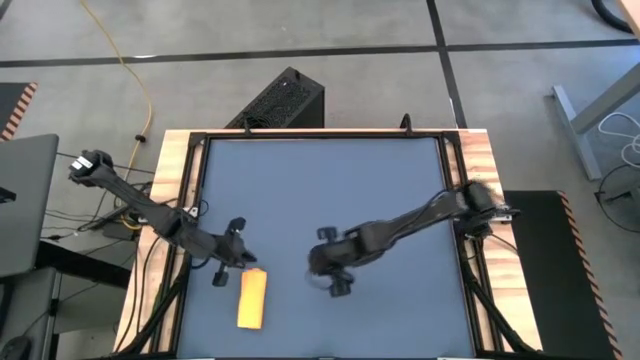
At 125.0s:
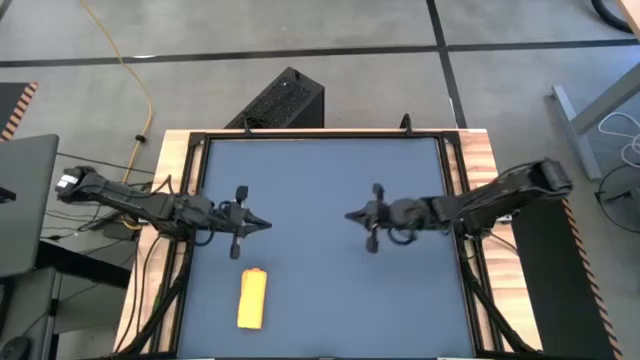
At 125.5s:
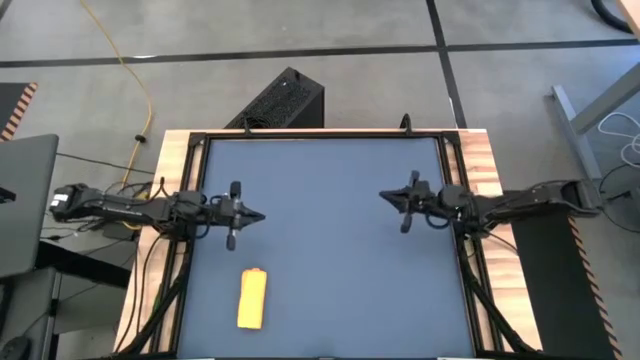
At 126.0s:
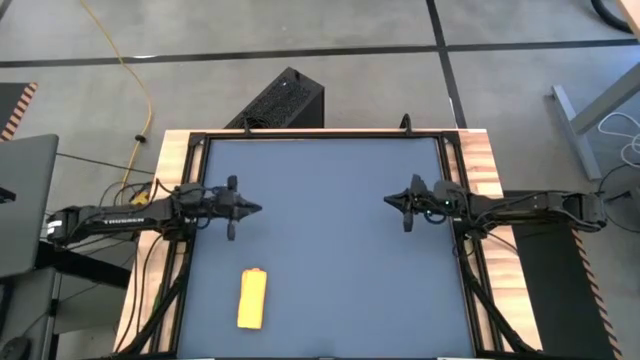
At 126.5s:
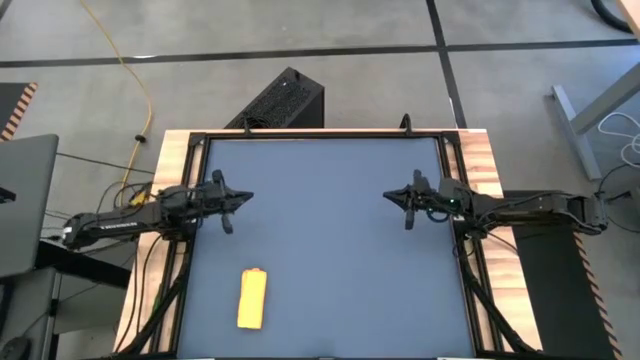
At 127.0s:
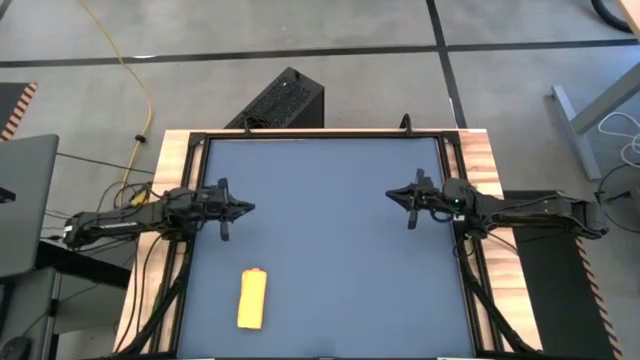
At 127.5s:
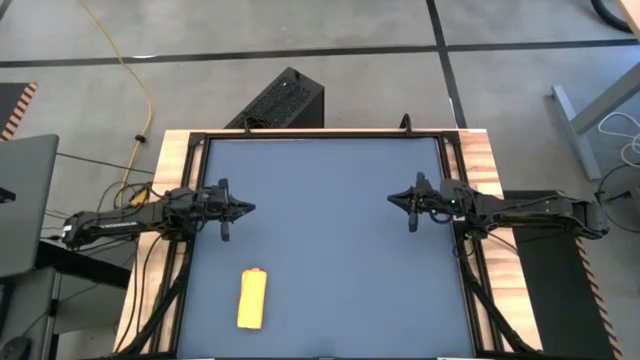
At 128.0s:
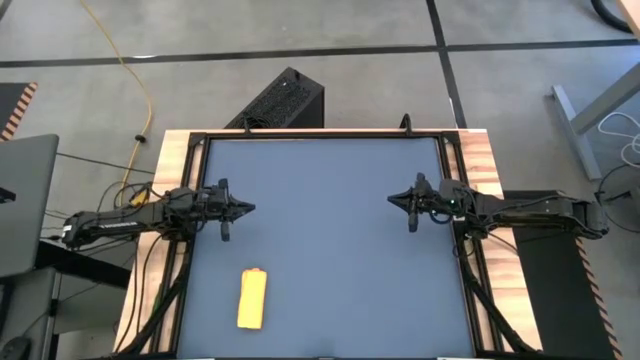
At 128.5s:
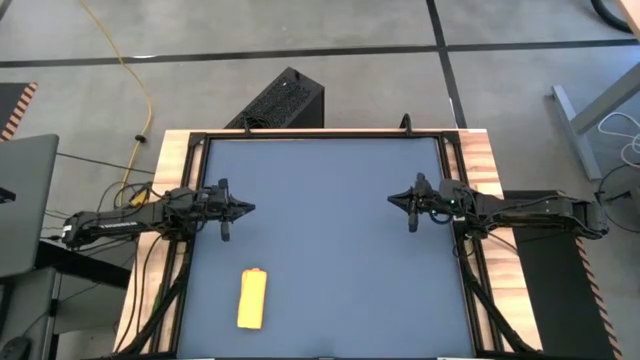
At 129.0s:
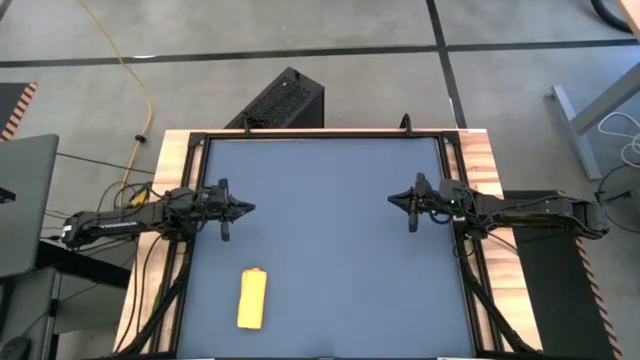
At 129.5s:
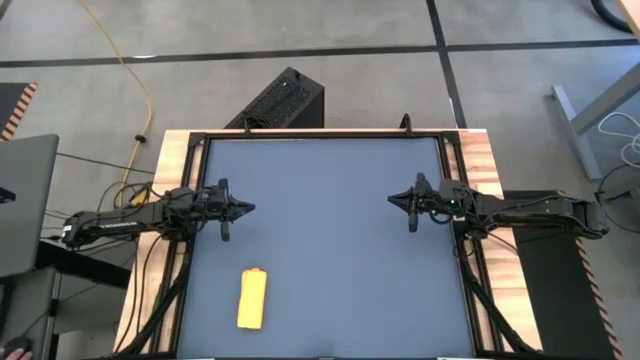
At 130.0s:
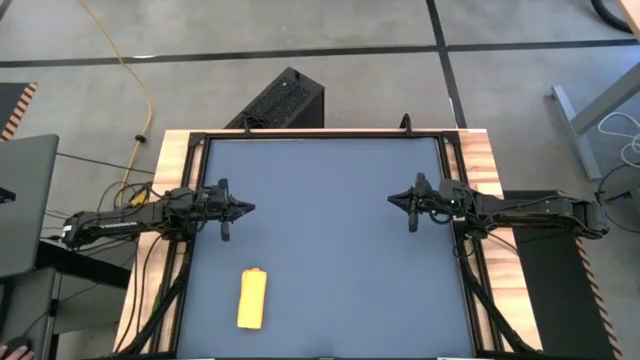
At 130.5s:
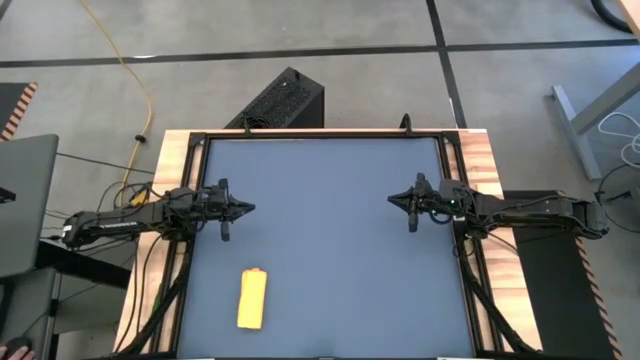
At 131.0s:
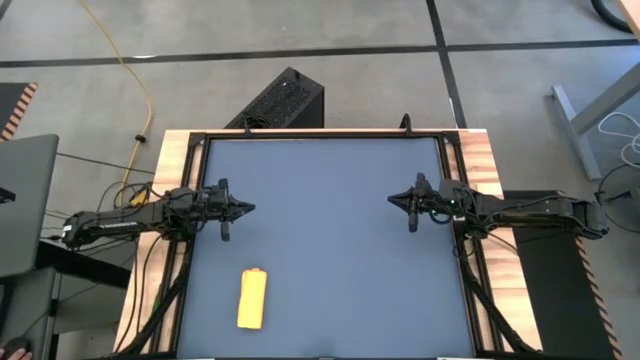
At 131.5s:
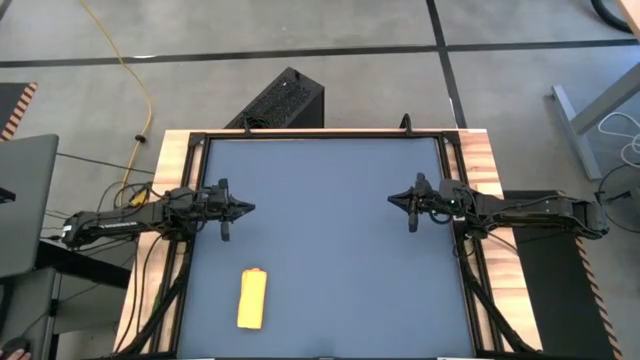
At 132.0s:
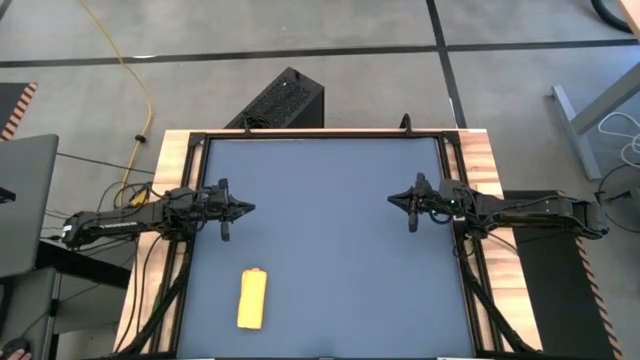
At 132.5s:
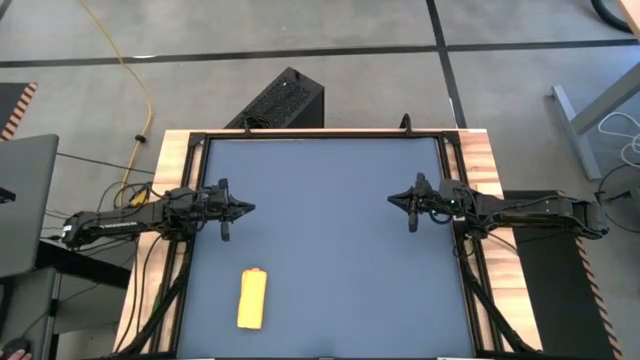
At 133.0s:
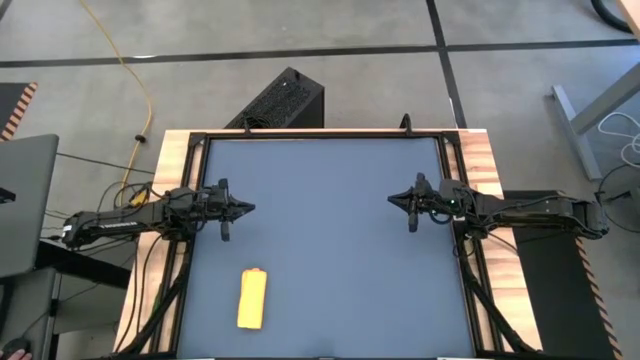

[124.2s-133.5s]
Task: Roll towel
Return to Home Position

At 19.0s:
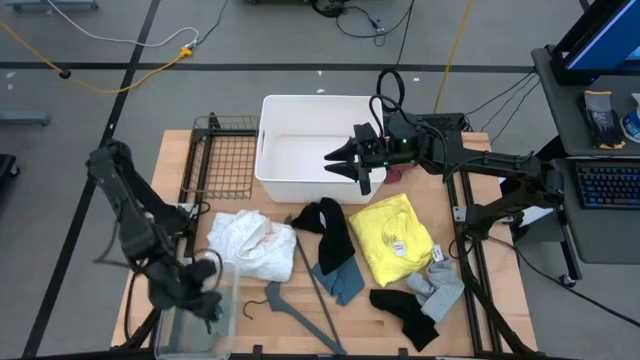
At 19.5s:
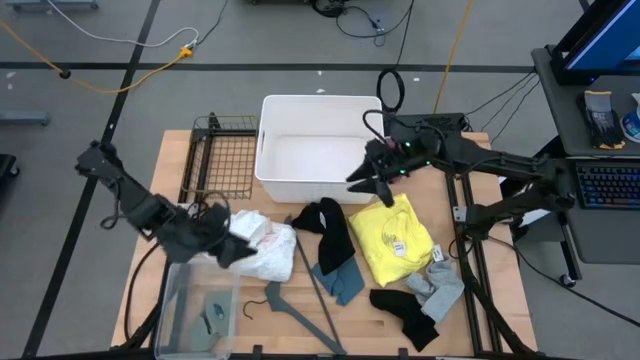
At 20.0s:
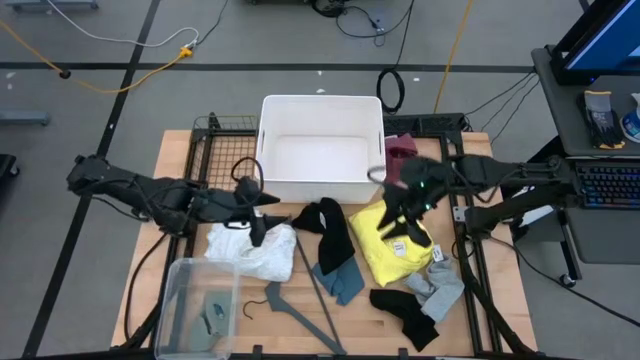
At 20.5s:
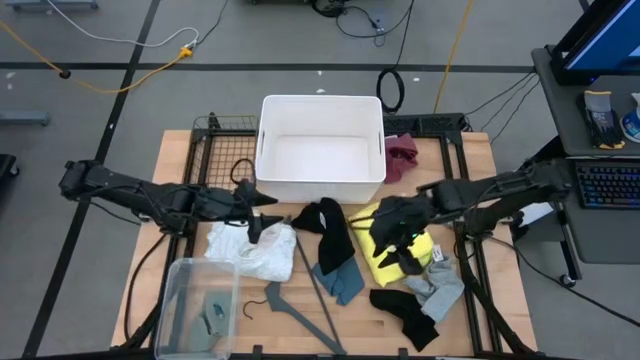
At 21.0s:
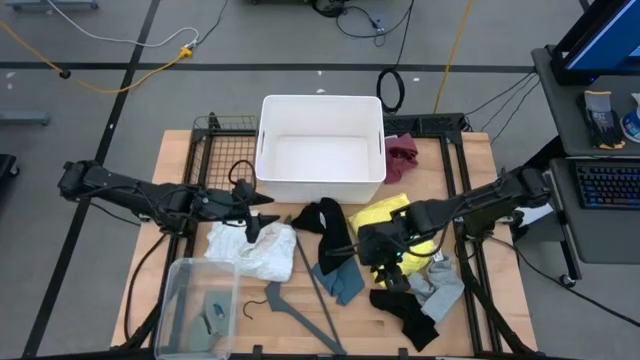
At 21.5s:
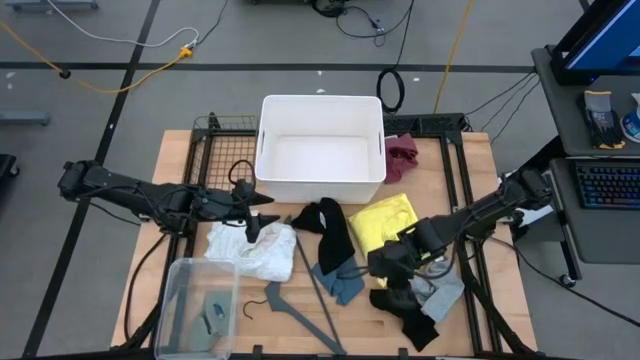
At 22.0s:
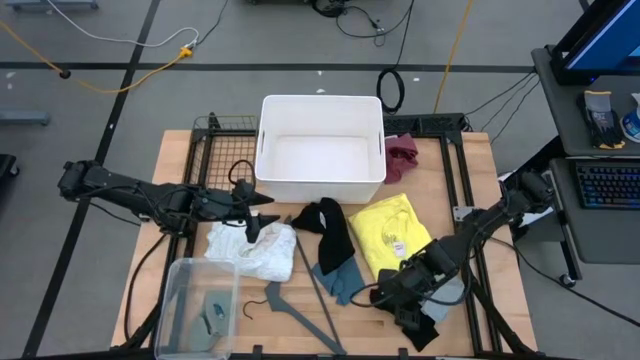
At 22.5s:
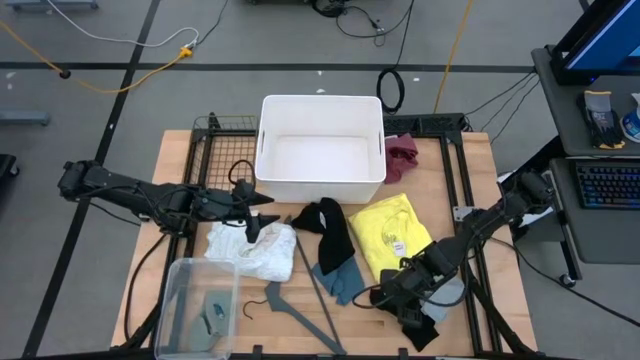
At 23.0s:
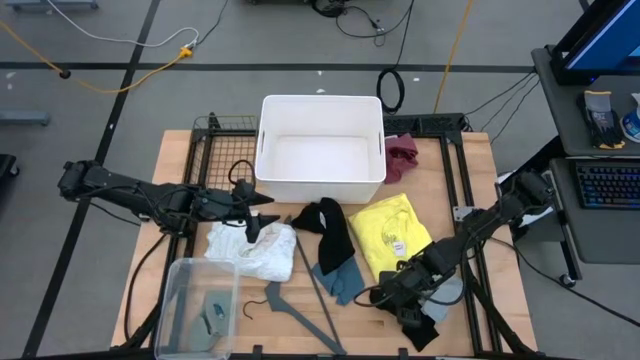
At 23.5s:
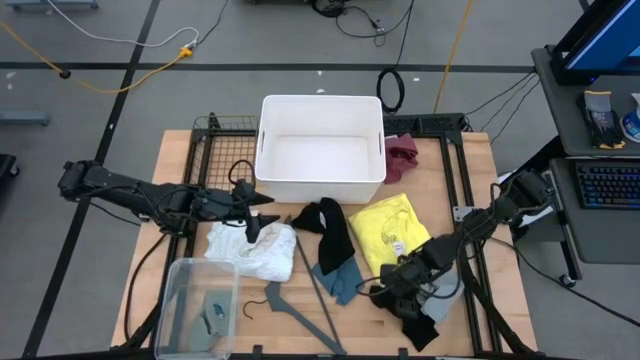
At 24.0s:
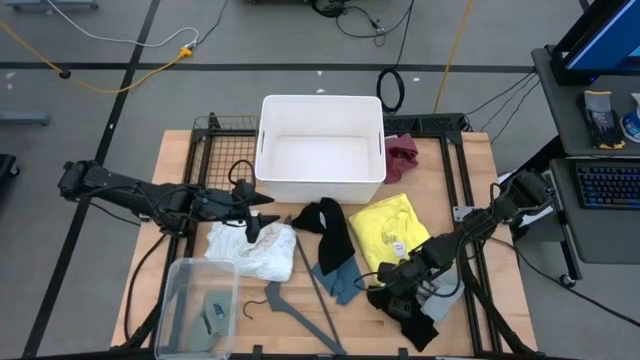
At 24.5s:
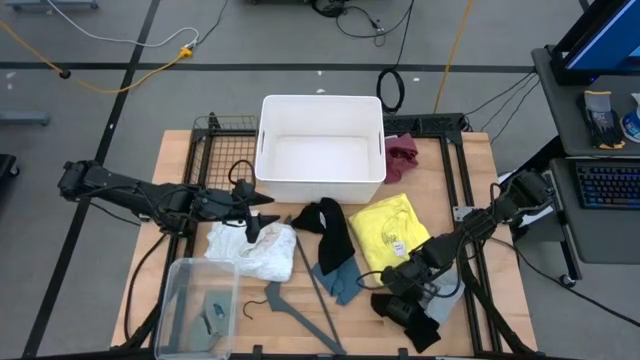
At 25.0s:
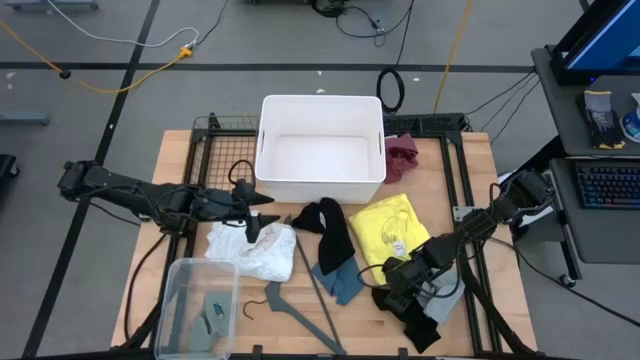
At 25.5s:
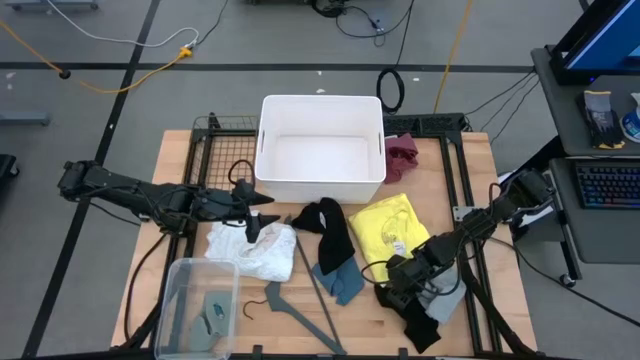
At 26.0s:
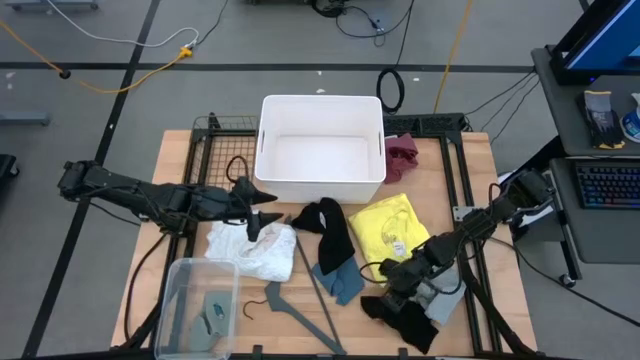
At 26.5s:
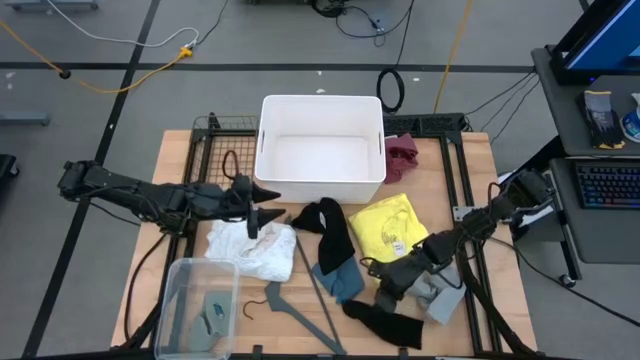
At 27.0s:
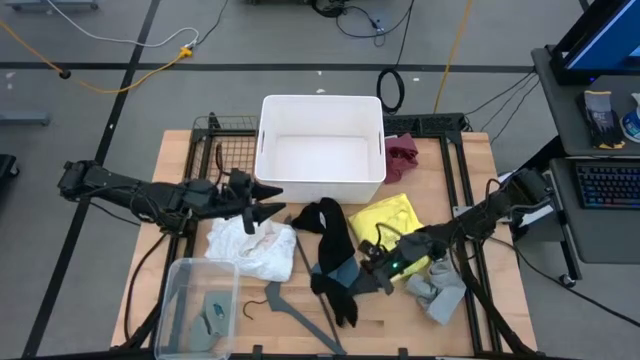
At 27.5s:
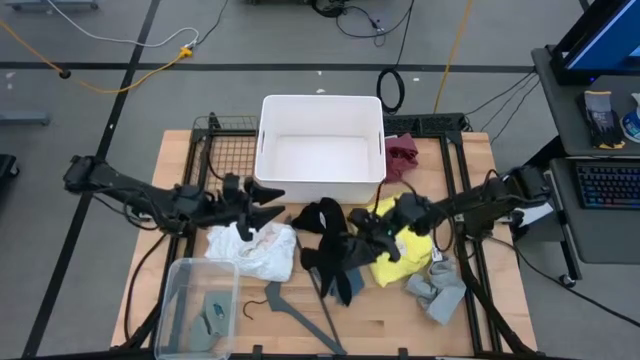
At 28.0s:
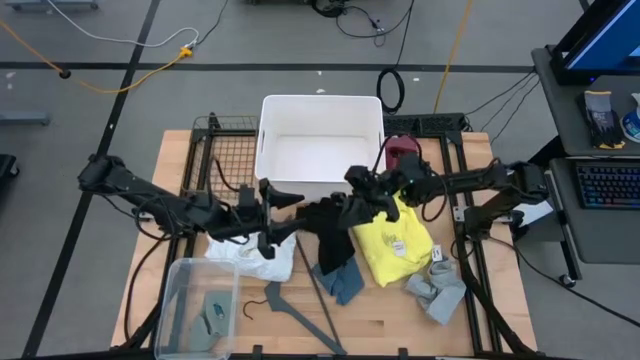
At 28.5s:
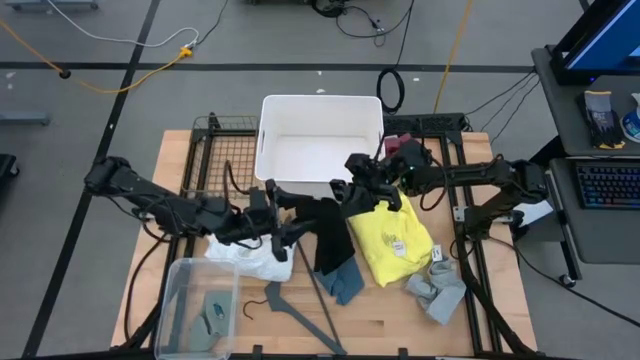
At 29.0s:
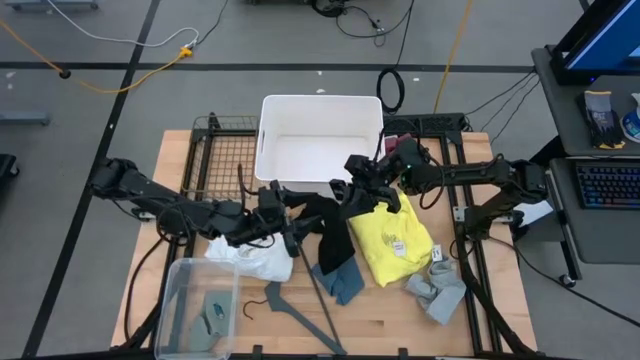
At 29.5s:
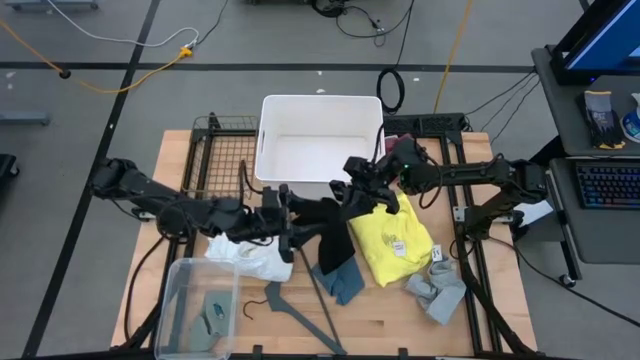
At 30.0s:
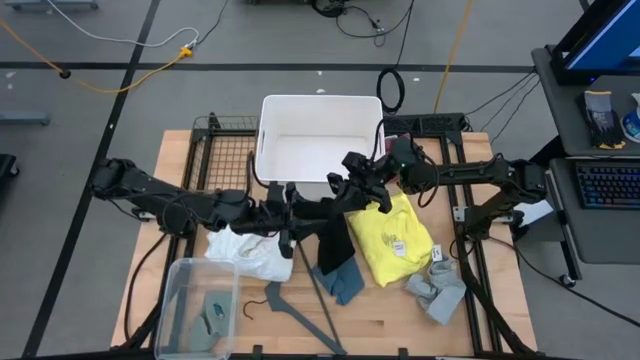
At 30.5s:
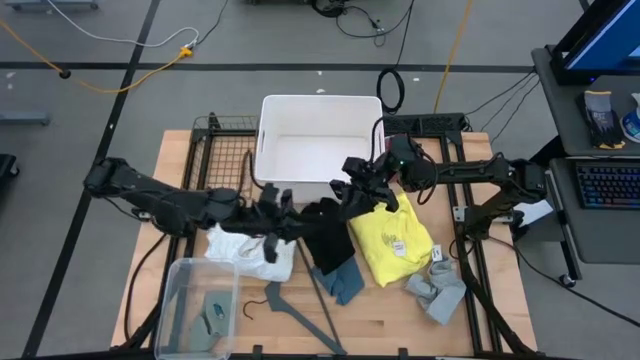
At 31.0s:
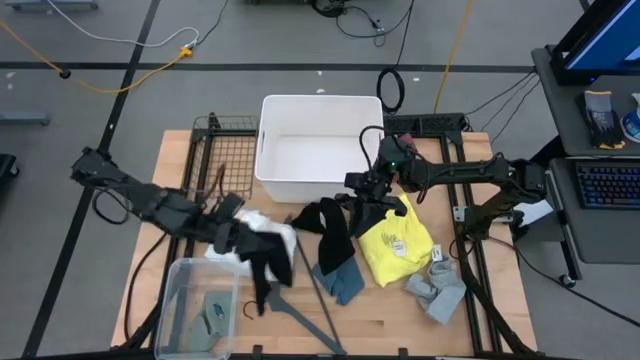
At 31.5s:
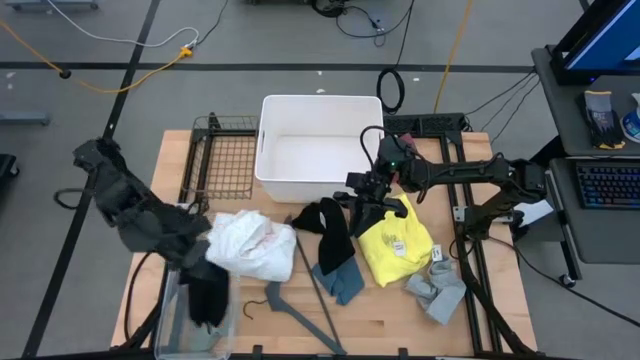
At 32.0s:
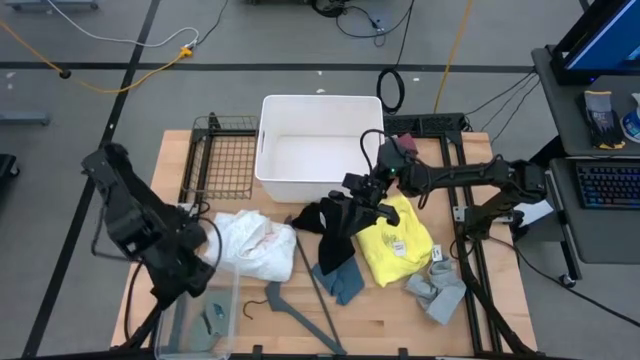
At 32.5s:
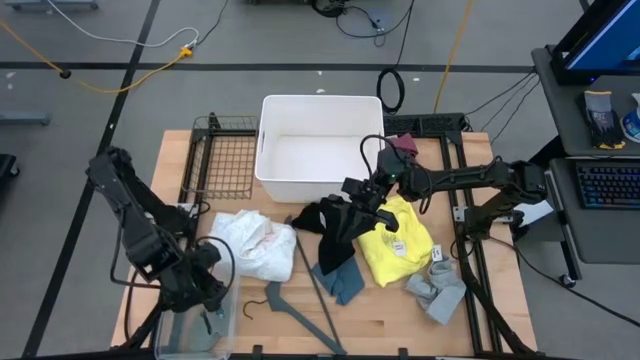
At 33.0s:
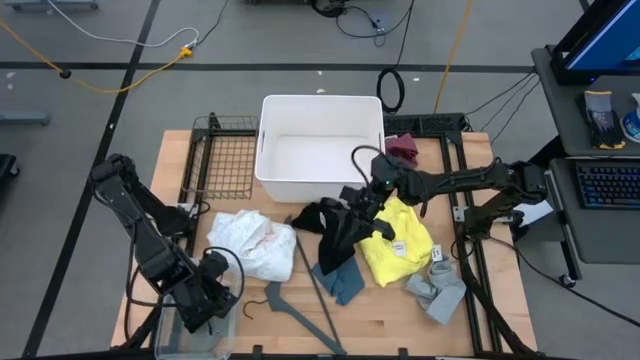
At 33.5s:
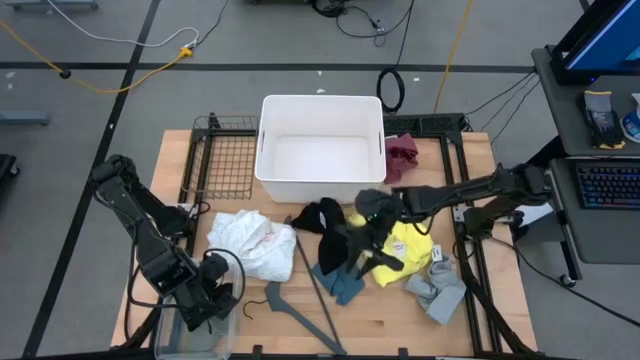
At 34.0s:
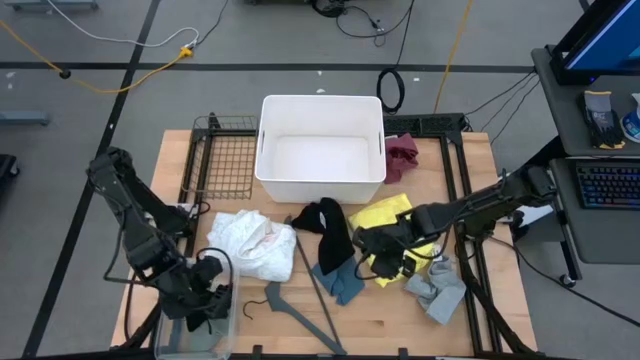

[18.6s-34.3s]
Task: Pick & Place Cloths
Put the black sock into the transparent bin
